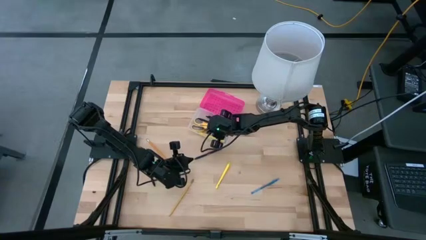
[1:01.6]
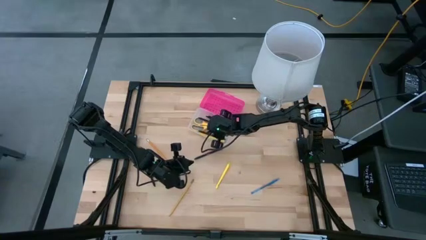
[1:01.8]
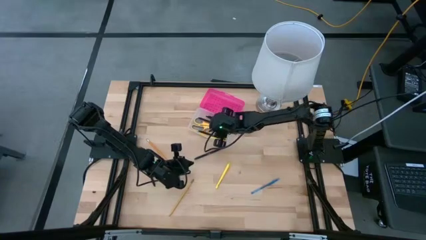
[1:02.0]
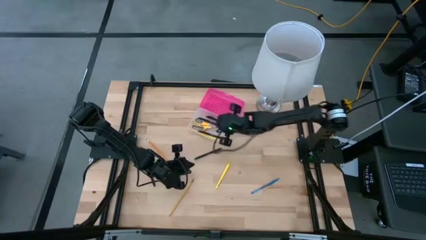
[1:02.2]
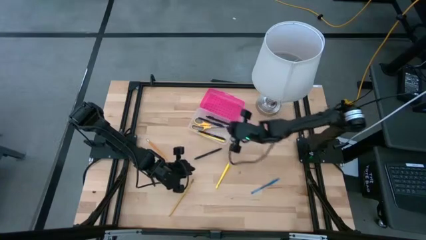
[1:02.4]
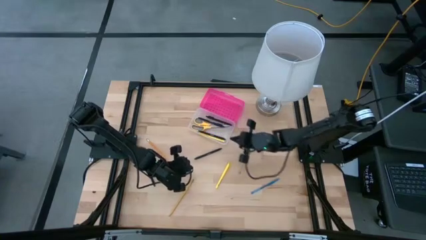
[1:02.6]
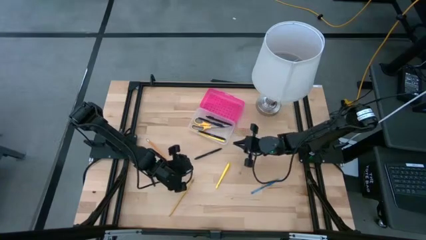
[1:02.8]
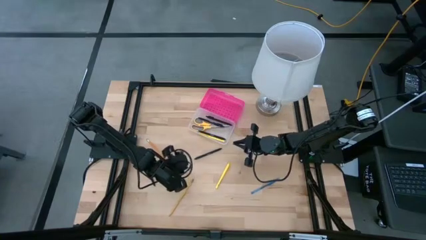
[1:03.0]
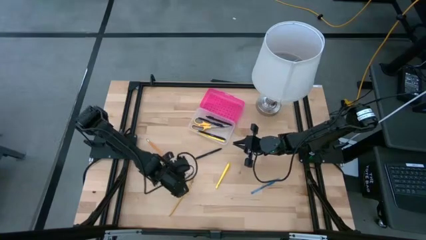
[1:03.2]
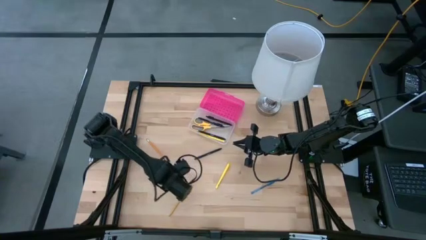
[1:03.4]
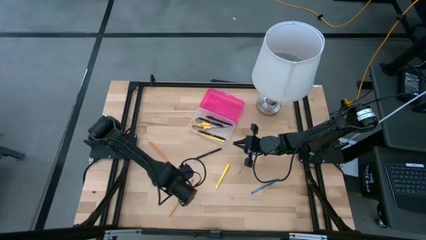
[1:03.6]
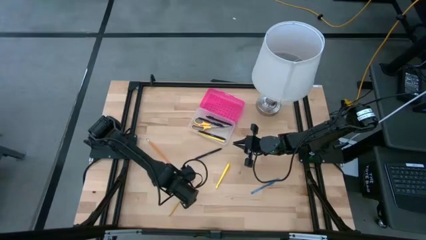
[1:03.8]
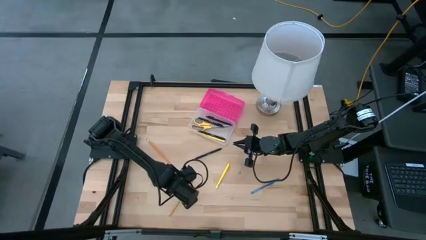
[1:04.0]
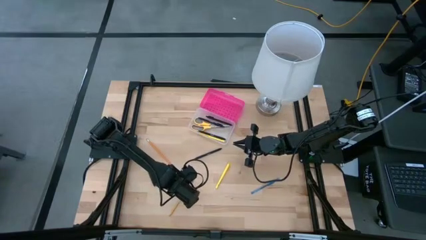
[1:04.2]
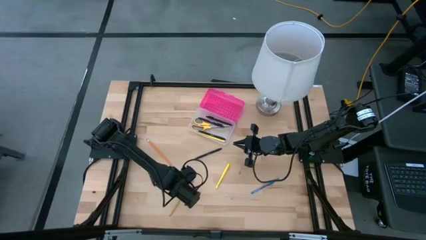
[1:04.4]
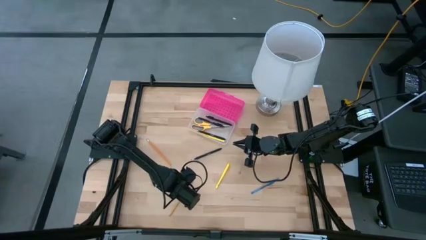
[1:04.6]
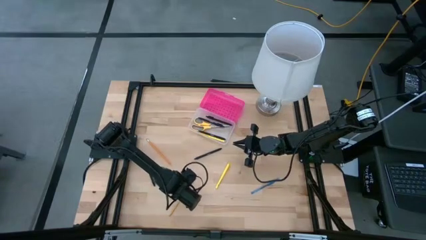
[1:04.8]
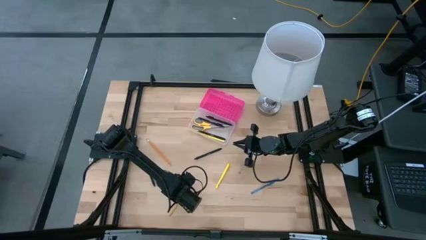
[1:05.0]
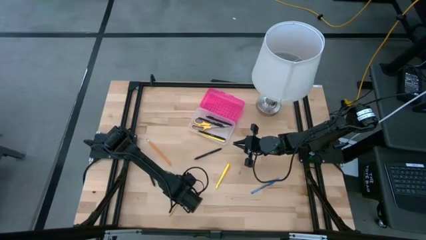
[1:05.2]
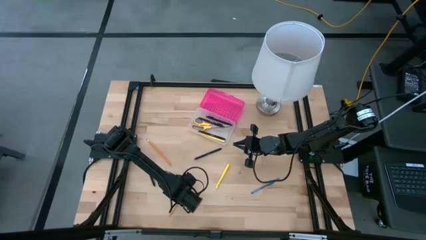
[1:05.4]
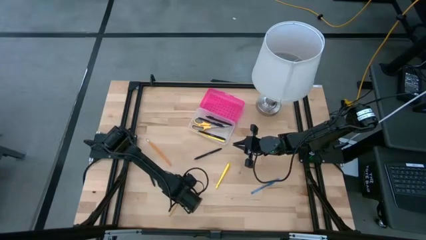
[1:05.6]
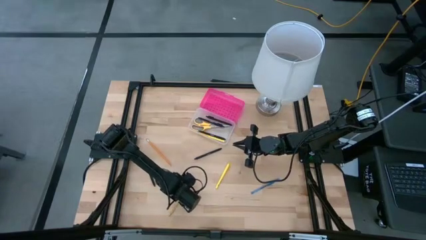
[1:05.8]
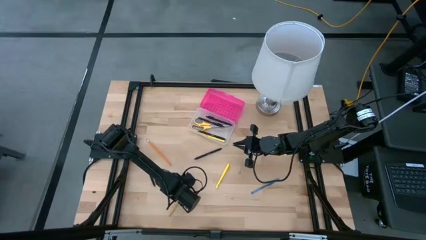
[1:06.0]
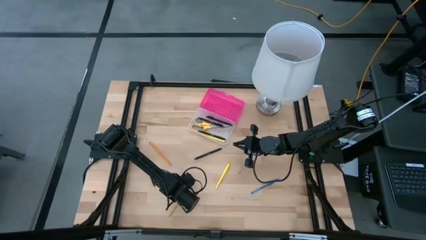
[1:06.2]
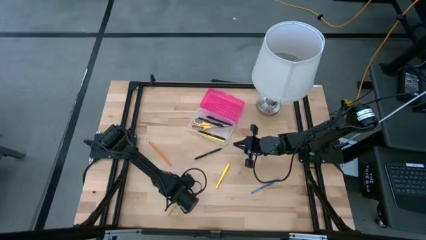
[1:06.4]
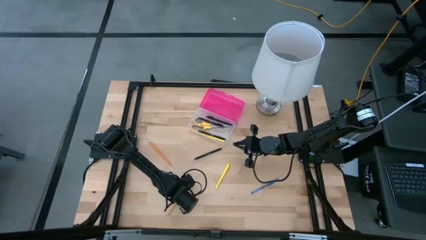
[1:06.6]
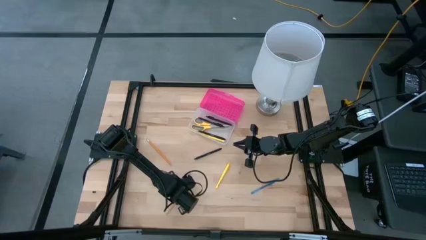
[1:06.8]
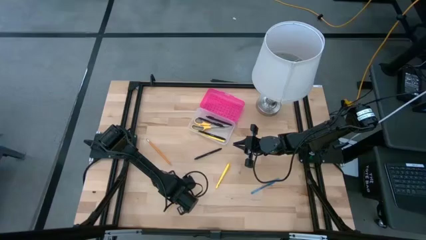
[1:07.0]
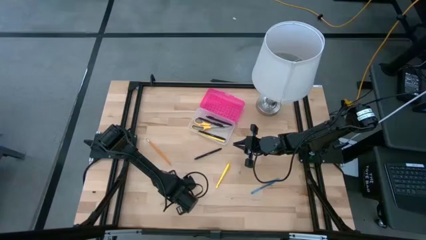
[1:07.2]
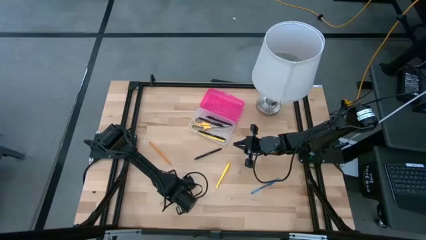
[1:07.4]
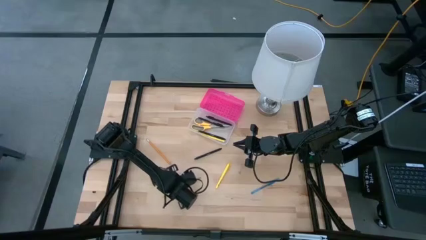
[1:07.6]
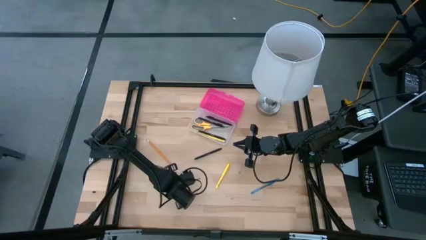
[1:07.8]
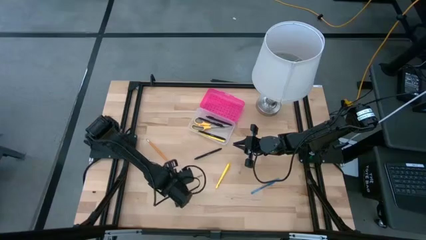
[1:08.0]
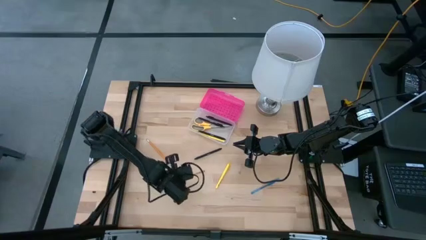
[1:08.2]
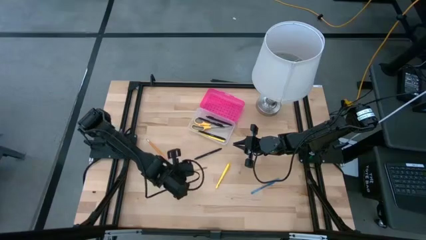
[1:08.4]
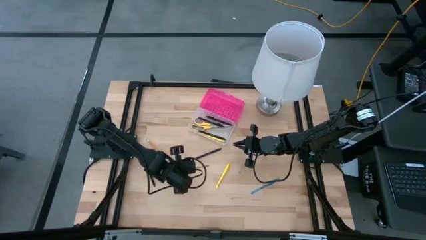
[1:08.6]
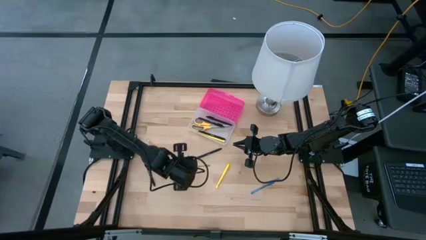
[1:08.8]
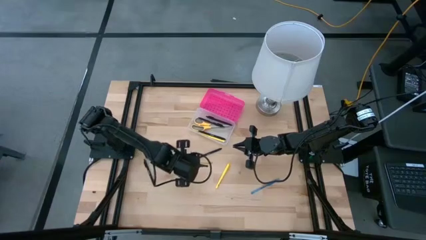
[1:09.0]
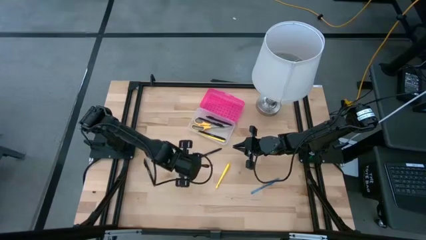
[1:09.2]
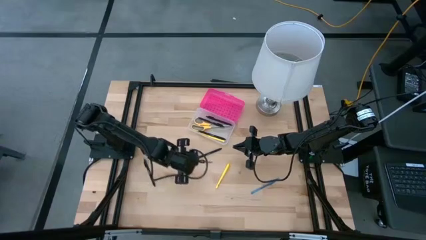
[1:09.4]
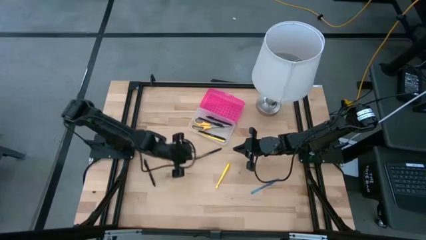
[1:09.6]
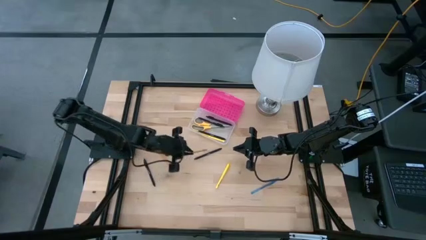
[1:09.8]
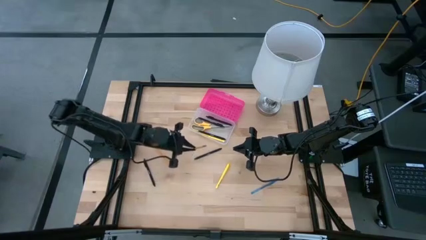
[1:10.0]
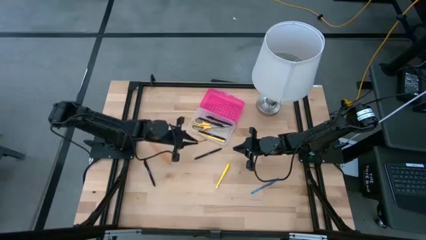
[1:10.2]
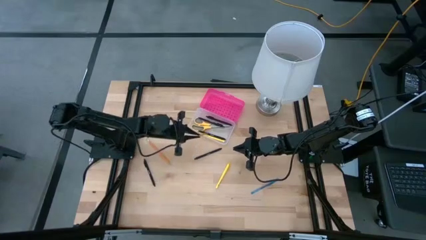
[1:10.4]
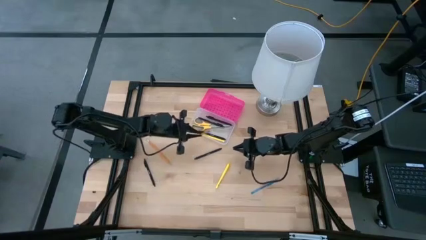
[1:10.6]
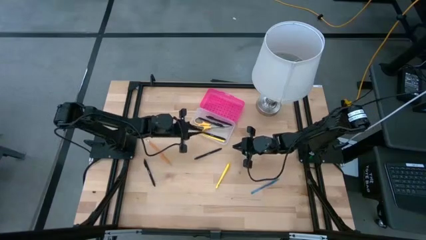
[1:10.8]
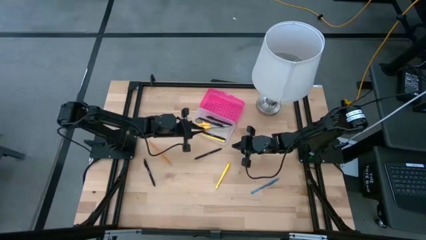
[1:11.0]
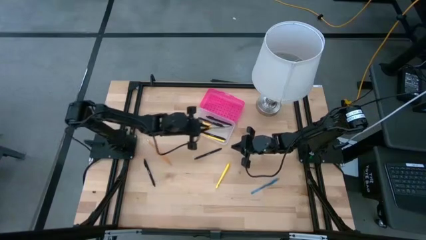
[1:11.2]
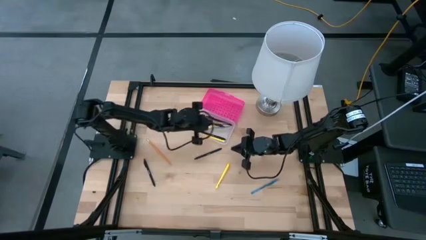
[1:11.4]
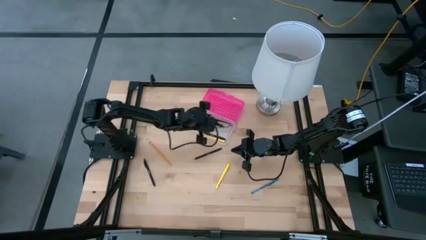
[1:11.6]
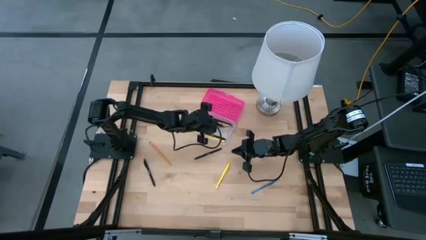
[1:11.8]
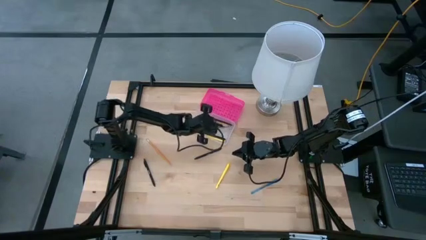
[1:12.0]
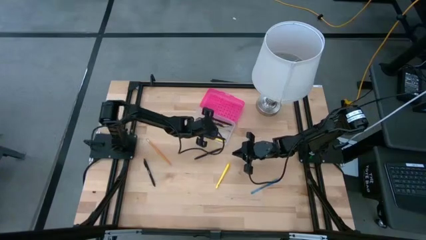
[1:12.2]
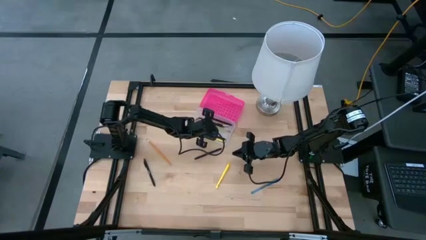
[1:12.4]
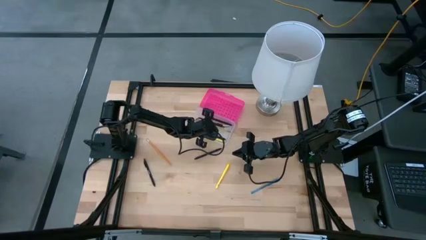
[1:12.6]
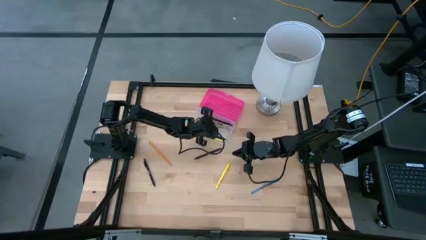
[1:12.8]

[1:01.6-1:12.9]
Task: Pick & place school supplies into a supply box
Put the yellow pencil into the pink supply box
